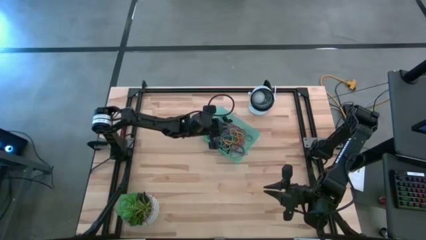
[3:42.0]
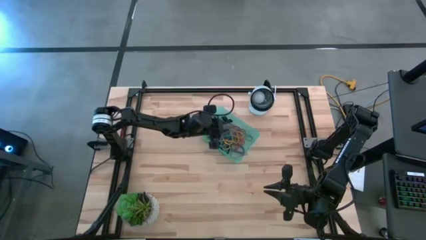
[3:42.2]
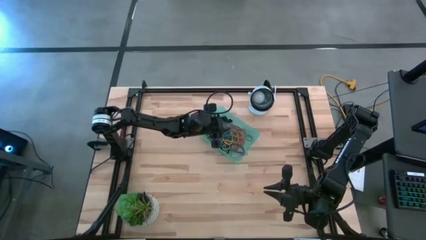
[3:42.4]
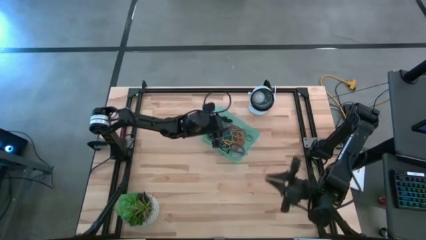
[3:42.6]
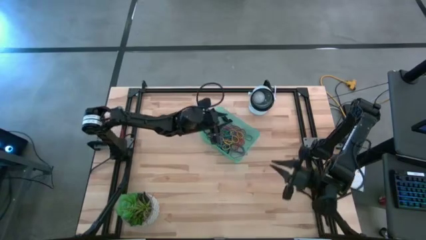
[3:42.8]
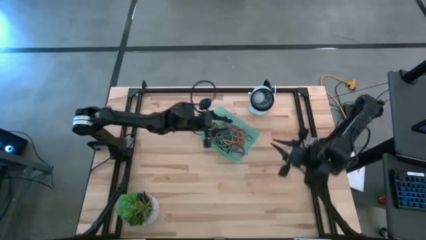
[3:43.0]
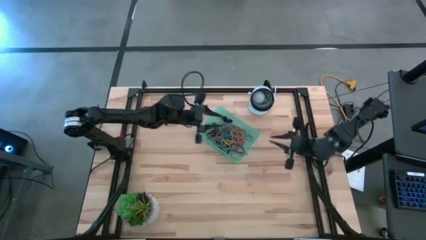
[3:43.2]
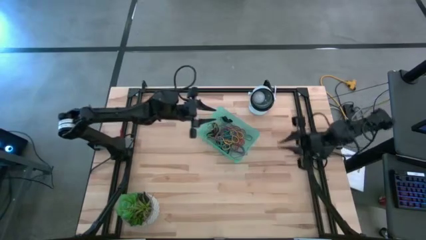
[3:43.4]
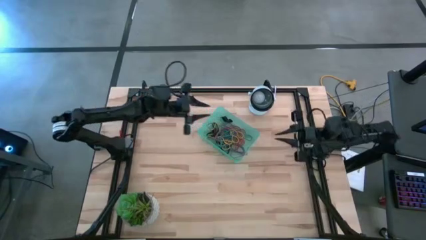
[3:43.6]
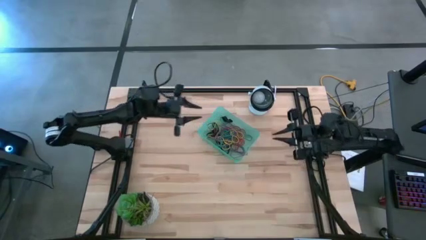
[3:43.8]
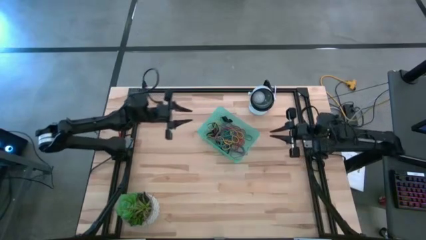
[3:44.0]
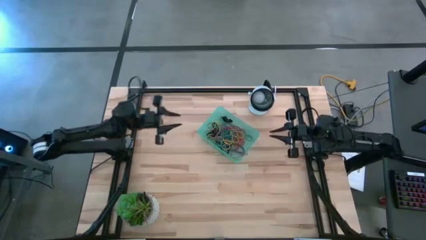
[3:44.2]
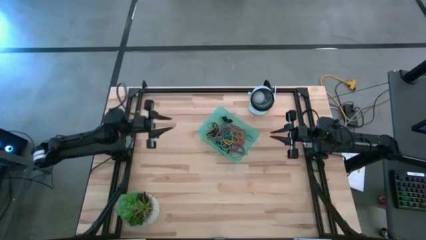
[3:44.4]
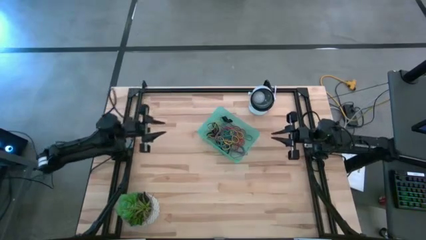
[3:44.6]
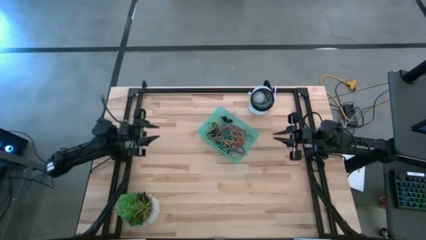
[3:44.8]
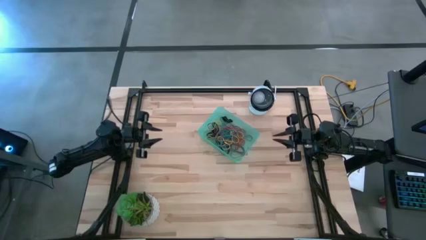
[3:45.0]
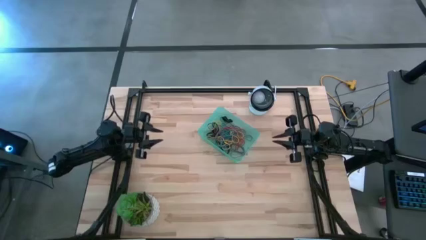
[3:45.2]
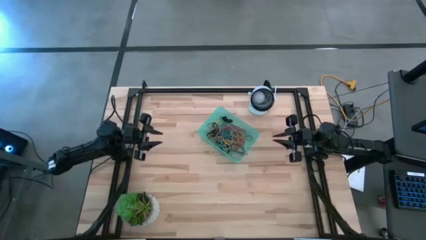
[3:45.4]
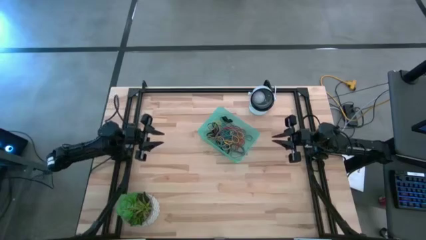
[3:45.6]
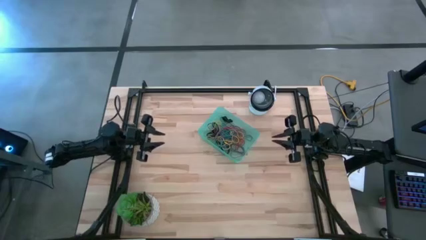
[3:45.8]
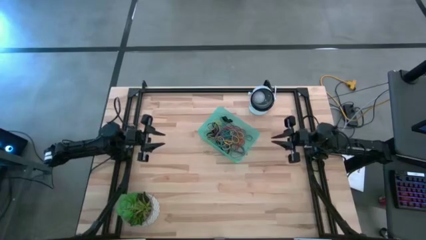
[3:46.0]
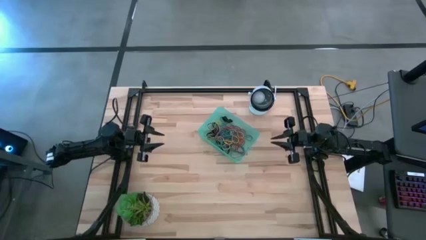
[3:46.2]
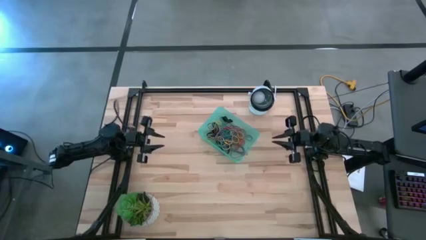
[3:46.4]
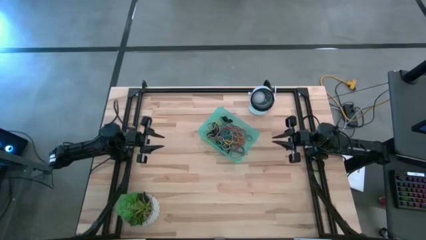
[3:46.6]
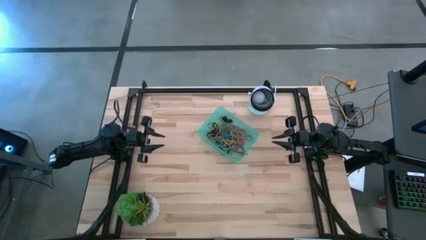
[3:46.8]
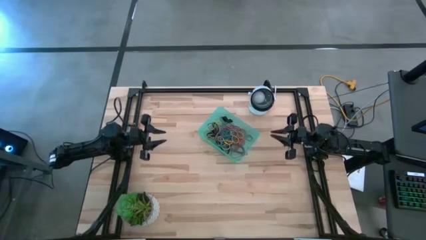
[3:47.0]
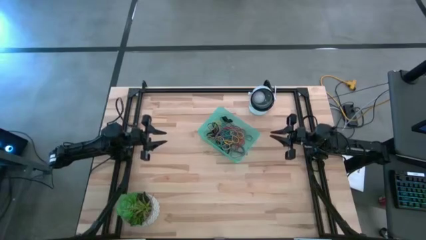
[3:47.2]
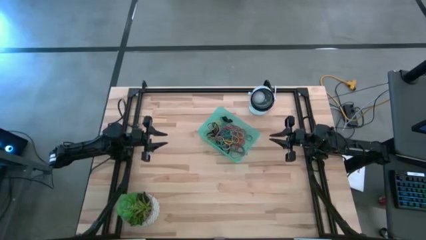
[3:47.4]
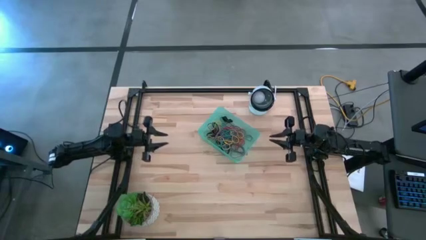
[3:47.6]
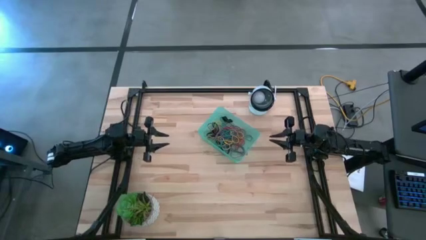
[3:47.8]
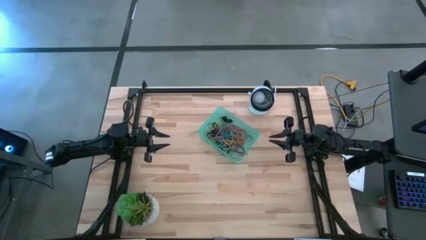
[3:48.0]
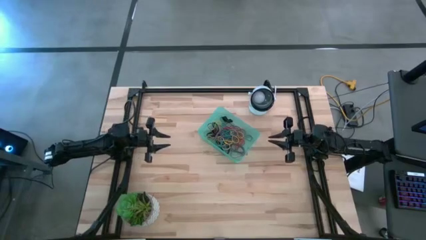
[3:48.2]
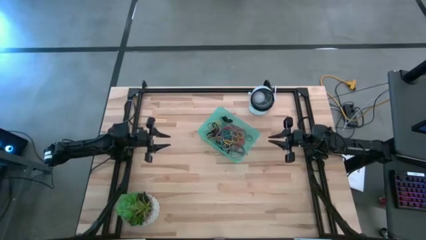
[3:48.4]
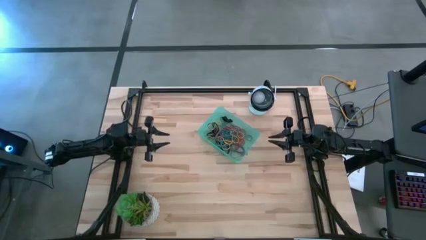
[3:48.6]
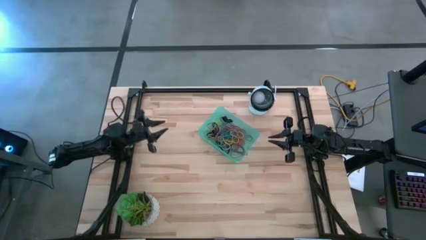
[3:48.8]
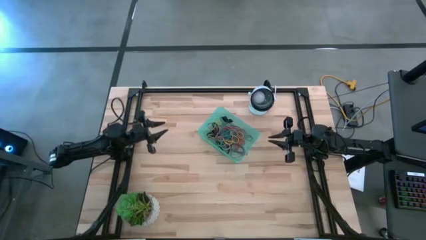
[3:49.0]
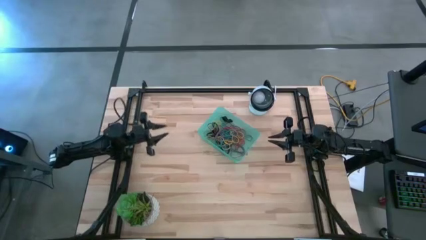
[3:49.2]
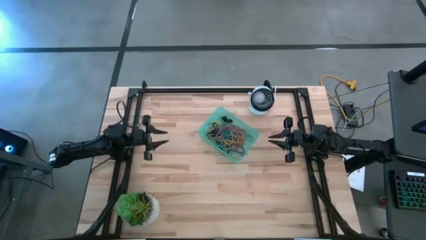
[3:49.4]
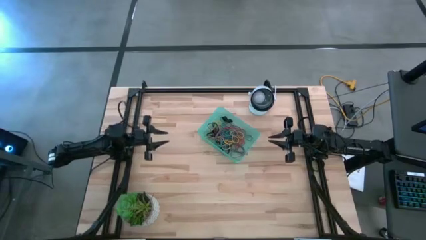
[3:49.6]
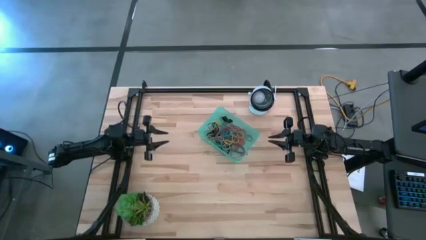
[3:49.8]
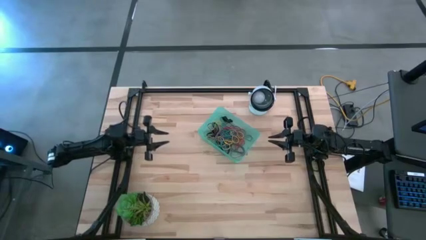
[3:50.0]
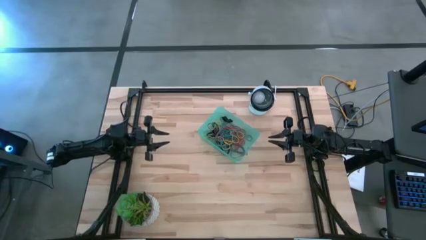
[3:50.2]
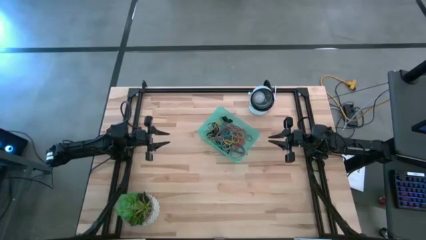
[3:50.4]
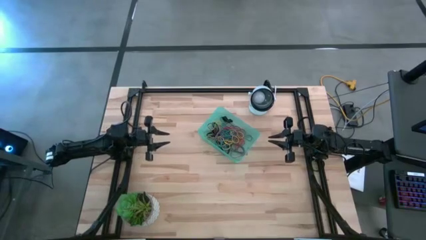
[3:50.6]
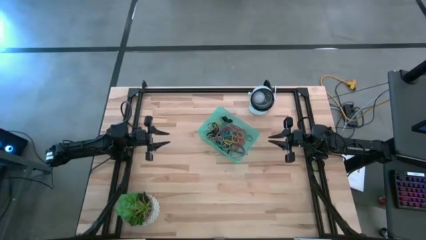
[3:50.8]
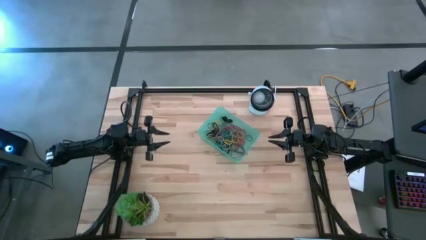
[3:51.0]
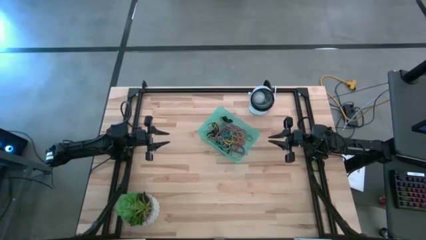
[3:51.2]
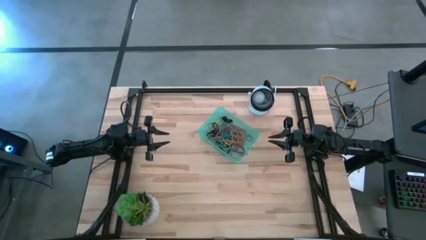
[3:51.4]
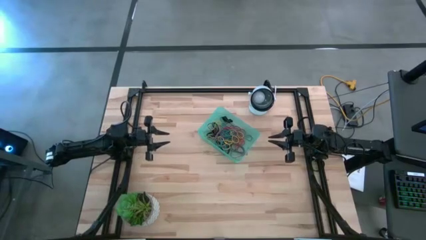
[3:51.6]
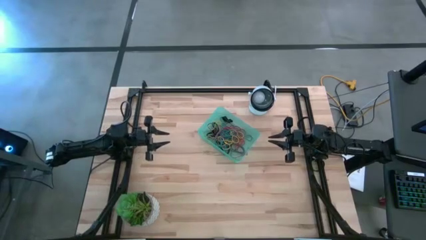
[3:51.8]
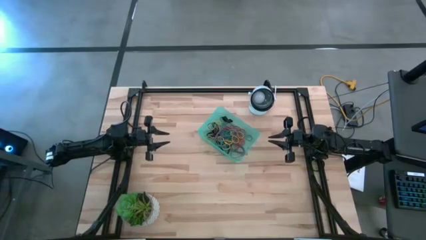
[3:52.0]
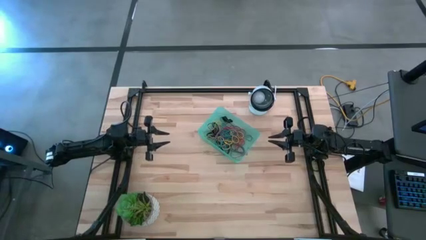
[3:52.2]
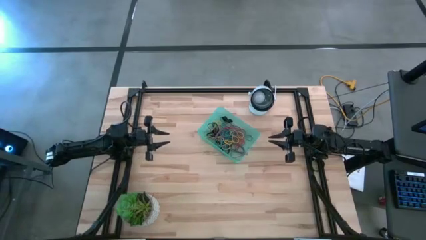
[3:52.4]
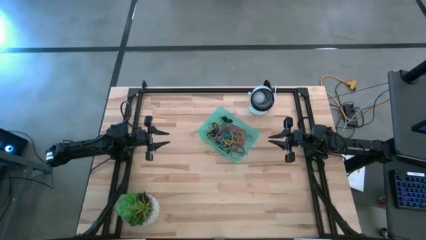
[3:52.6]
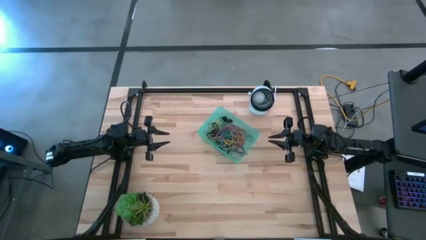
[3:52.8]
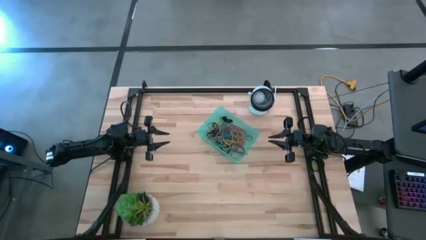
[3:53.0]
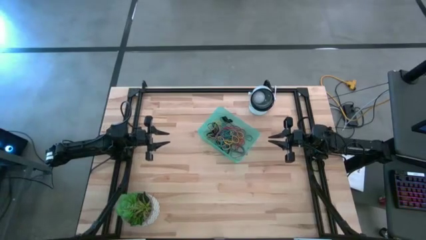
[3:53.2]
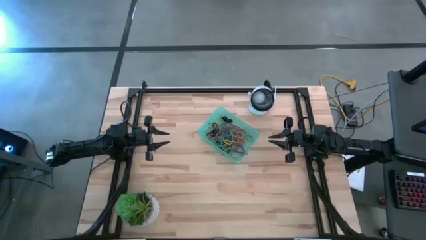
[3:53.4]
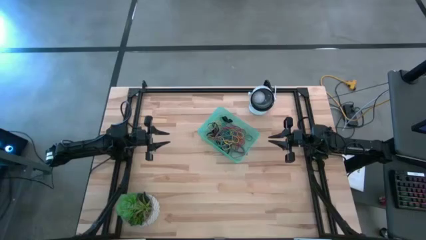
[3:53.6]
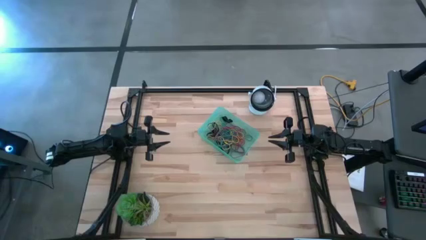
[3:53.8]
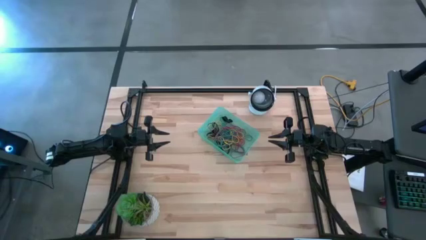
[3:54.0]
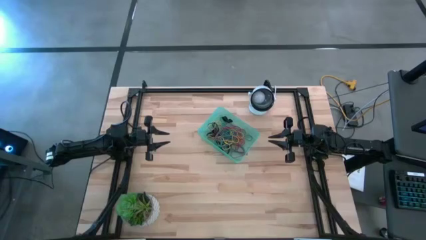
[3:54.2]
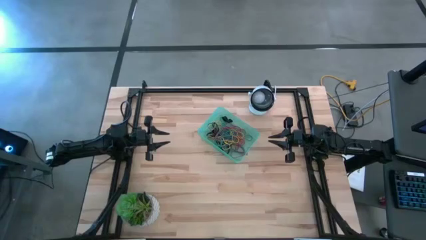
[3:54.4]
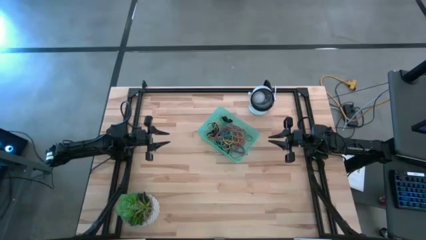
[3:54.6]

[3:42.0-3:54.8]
Task: Pick and place rubber bands into bin
Return to Home Position

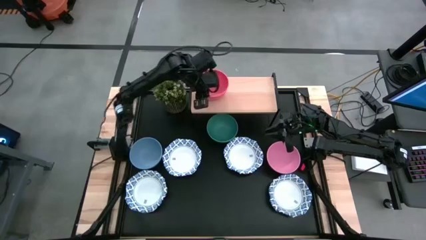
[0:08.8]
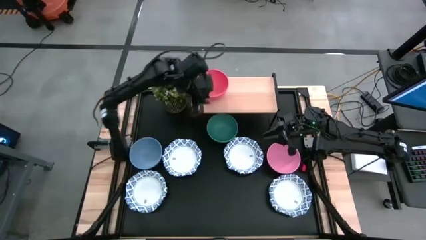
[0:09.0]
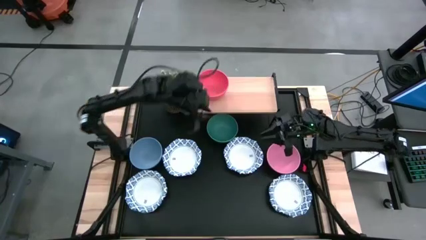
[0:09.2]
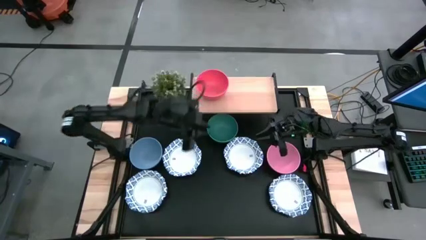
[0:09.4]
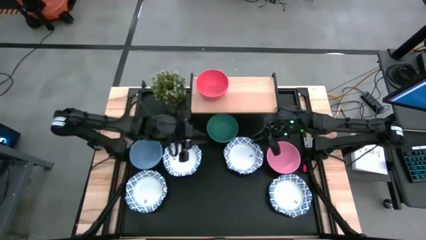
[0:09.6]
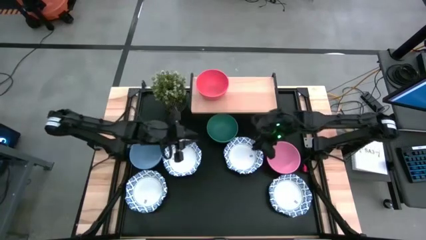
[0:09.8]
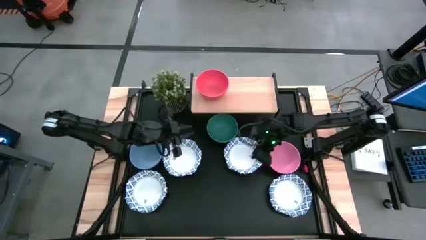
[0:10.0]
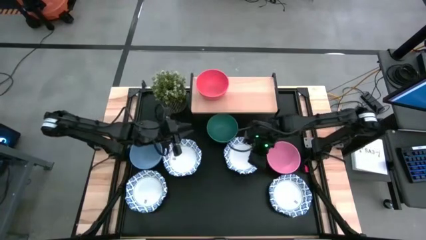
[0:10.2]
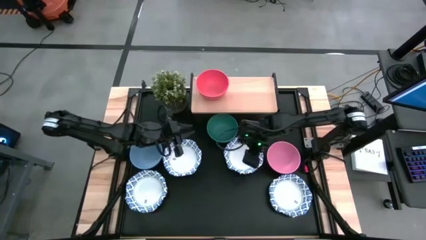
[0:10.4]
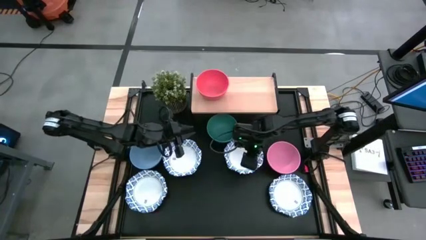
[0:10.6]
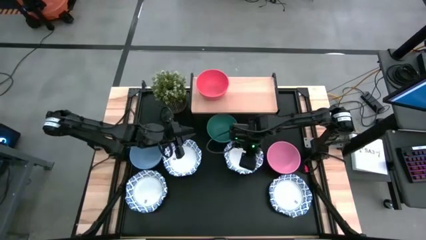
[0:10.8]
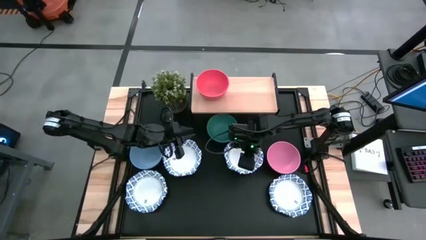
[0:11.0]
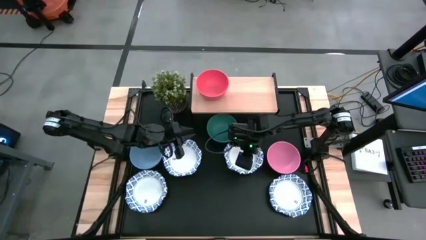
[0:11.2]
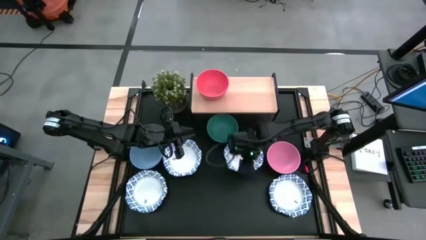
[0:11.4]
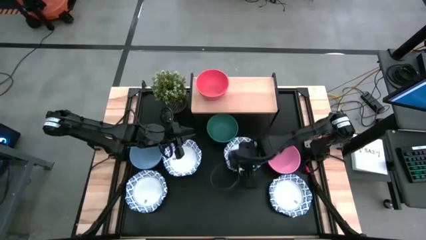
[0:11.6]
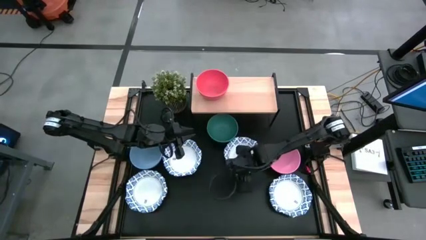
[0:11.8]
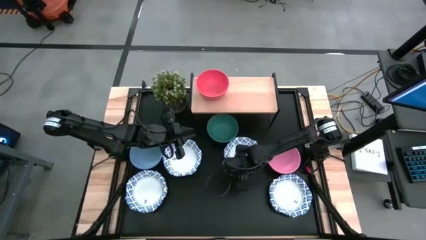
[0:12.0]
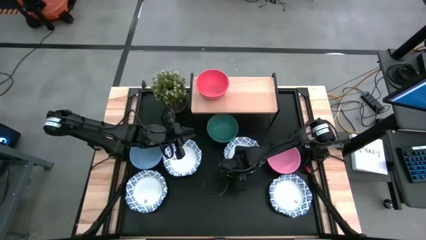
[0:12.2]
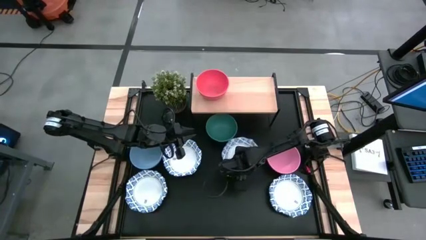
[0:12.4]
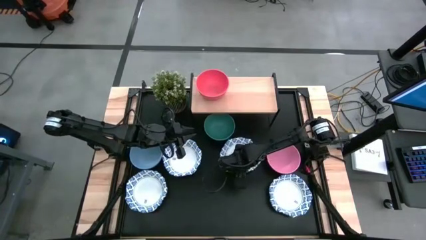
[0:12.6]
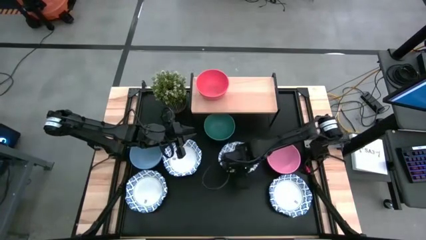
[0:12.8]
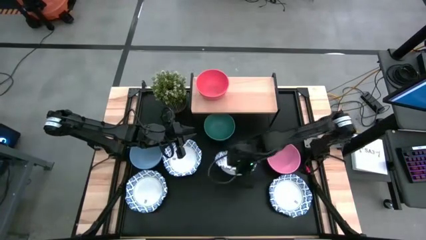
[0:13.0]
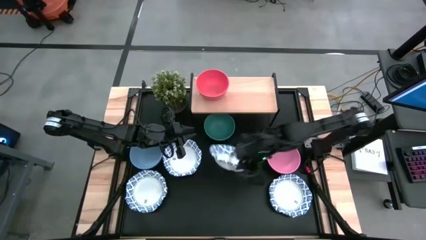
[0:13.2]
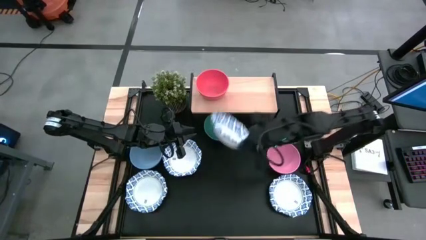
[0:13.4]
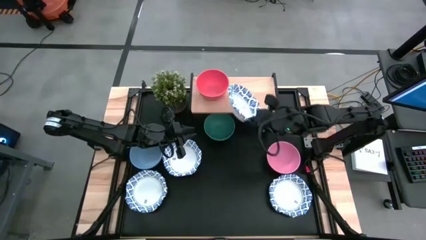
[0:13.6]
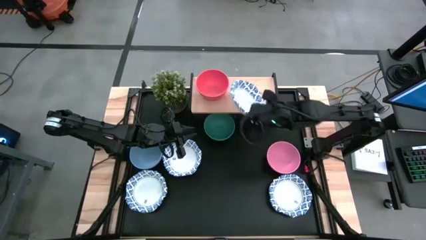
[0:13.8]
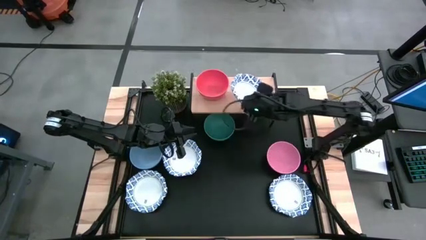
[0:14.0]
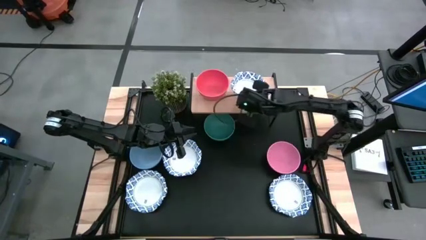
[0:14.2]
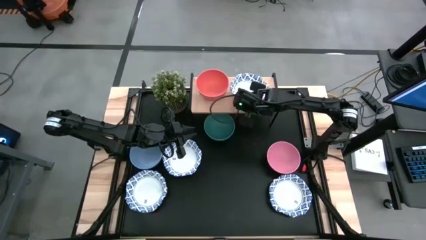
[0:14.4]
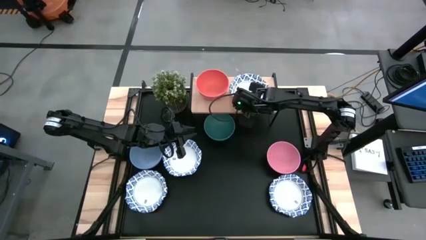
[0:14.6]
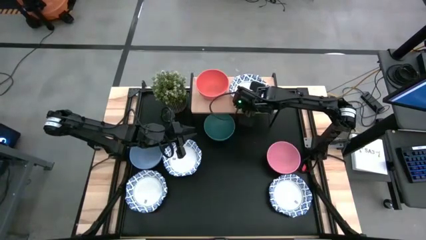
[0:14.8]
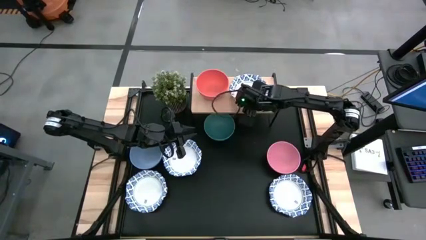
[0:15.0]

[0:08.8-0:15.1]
Task: Place and stack bowls onto a shelf
Put the white patterned bowl on the shelf
